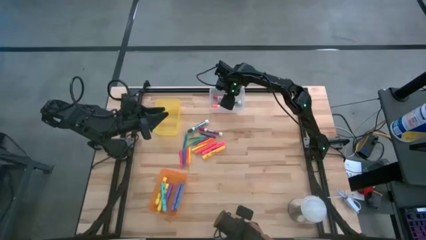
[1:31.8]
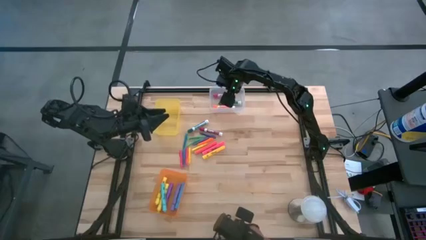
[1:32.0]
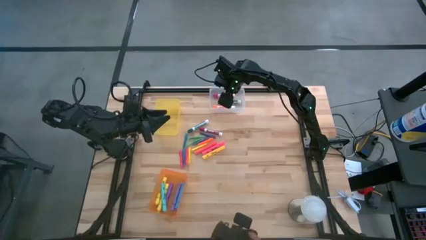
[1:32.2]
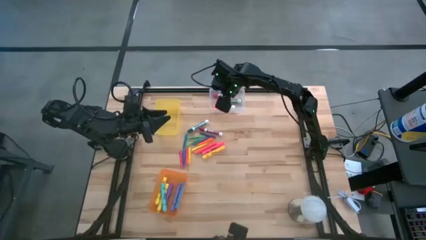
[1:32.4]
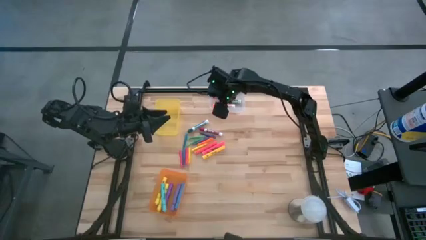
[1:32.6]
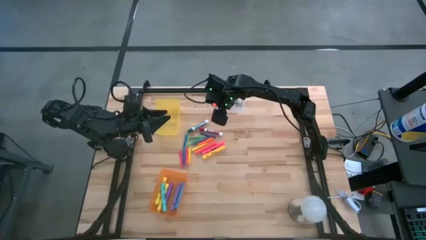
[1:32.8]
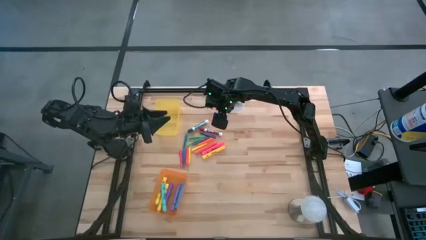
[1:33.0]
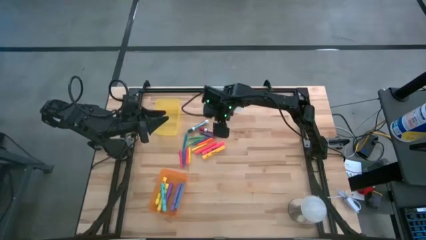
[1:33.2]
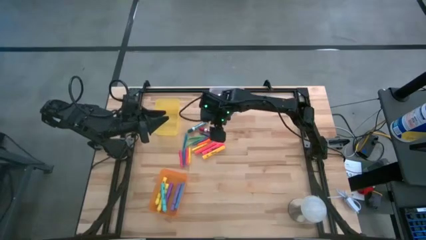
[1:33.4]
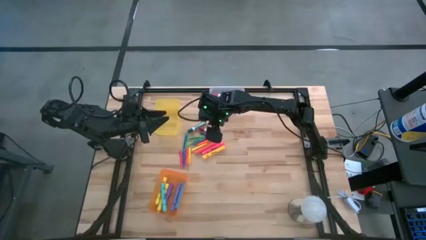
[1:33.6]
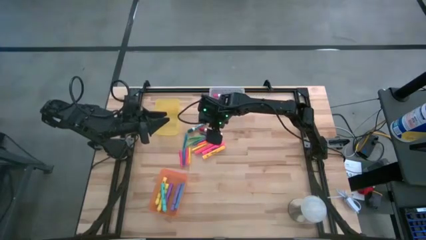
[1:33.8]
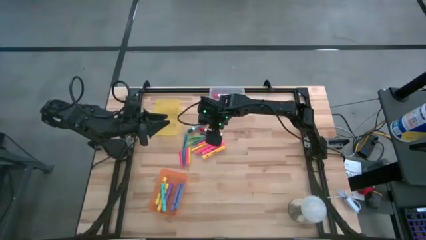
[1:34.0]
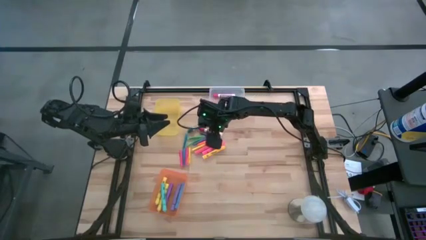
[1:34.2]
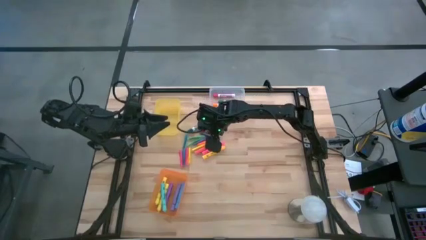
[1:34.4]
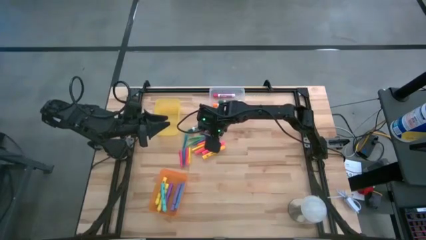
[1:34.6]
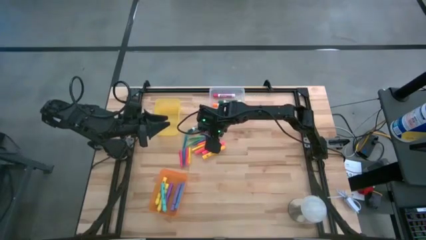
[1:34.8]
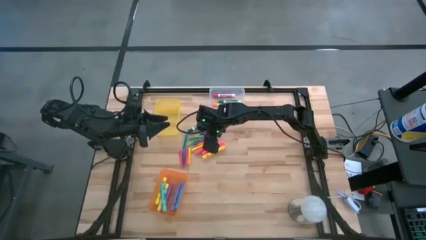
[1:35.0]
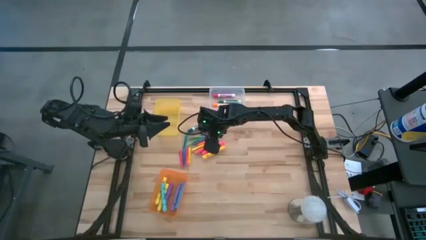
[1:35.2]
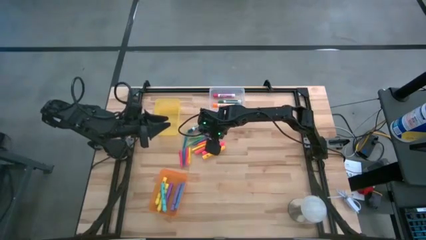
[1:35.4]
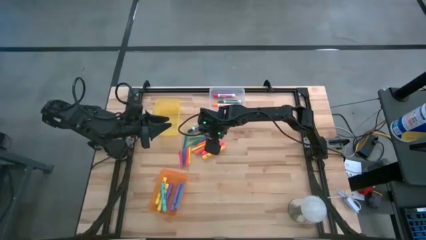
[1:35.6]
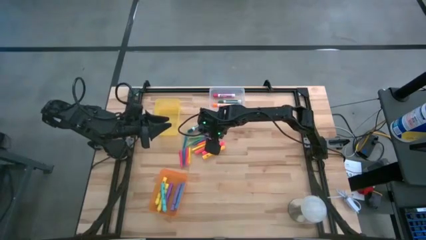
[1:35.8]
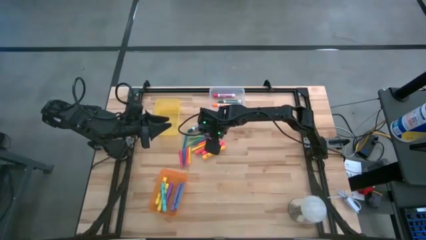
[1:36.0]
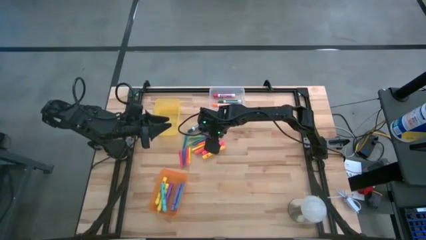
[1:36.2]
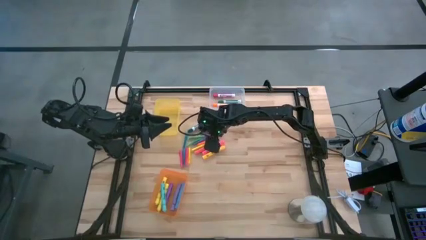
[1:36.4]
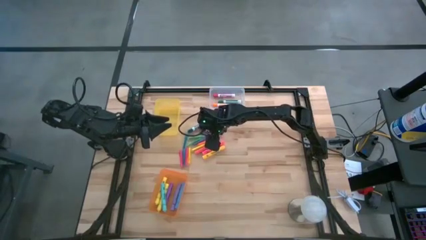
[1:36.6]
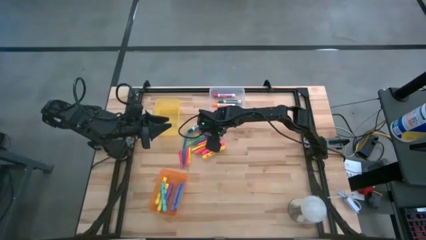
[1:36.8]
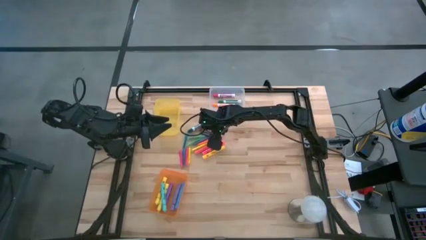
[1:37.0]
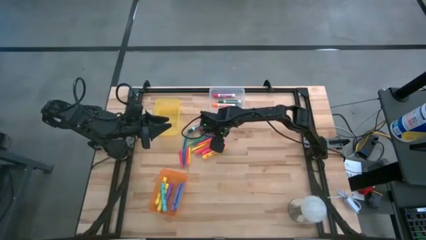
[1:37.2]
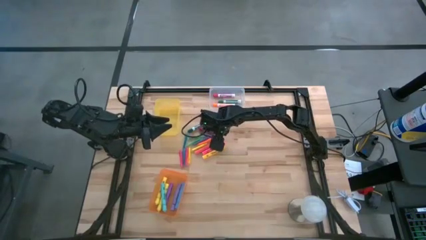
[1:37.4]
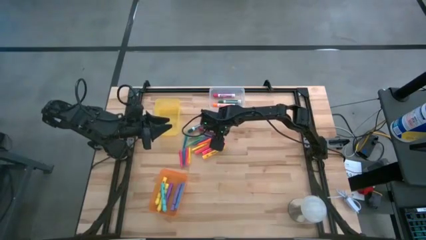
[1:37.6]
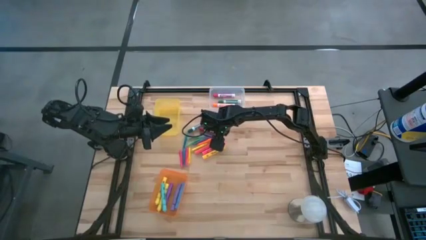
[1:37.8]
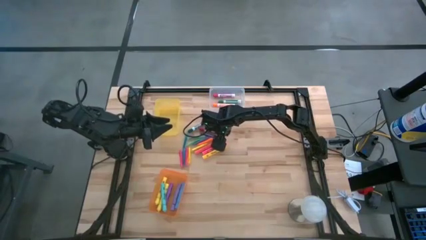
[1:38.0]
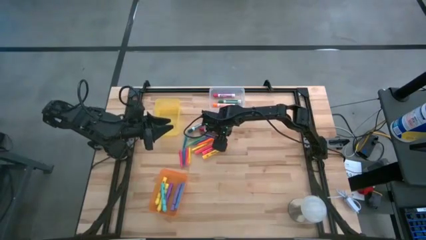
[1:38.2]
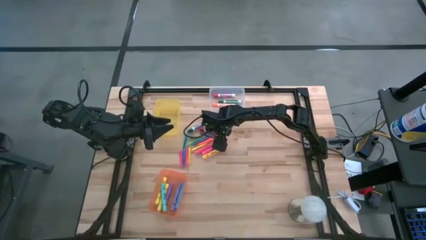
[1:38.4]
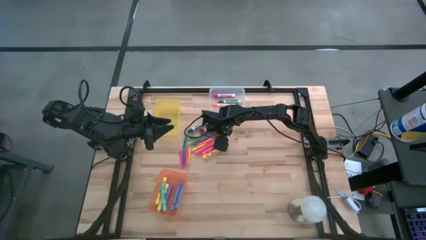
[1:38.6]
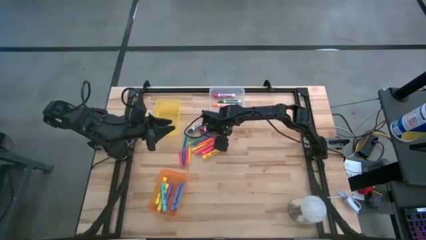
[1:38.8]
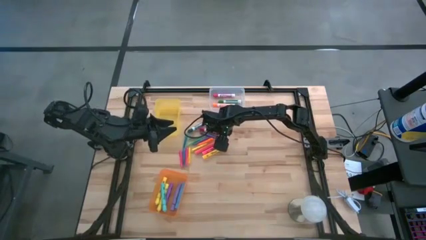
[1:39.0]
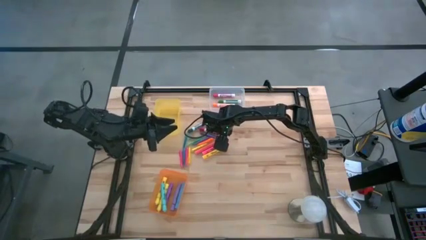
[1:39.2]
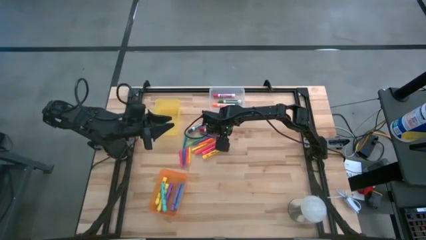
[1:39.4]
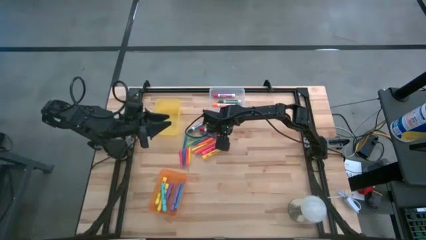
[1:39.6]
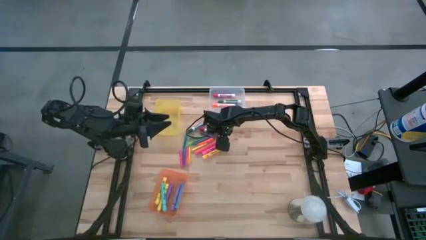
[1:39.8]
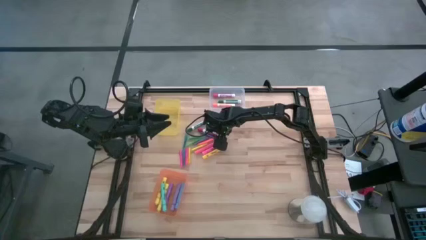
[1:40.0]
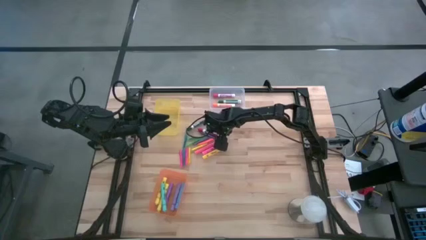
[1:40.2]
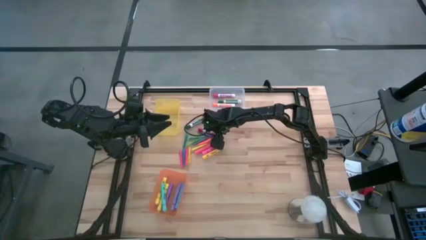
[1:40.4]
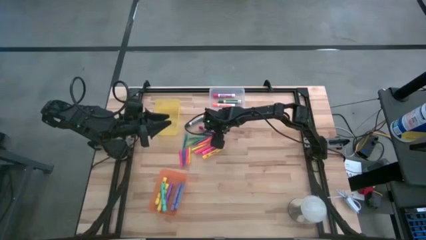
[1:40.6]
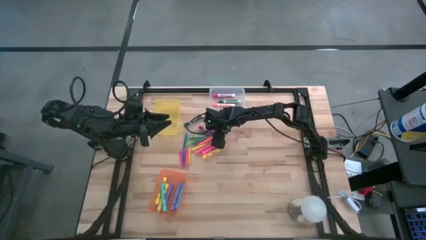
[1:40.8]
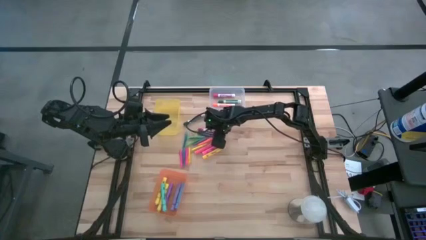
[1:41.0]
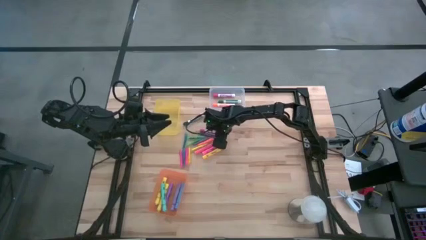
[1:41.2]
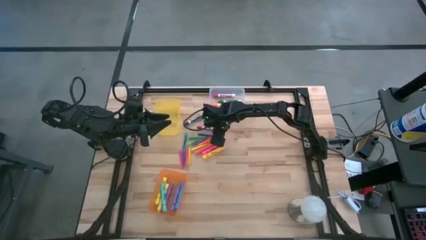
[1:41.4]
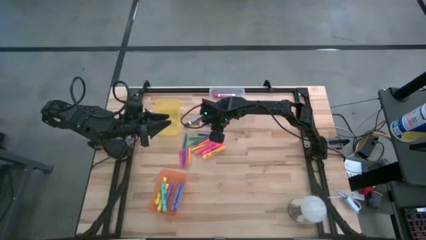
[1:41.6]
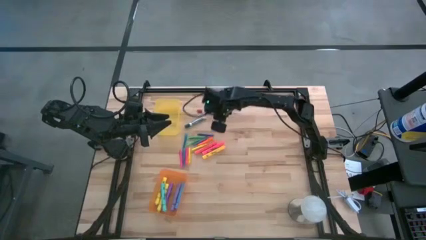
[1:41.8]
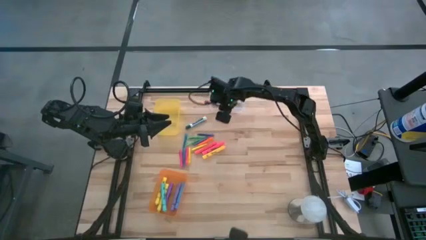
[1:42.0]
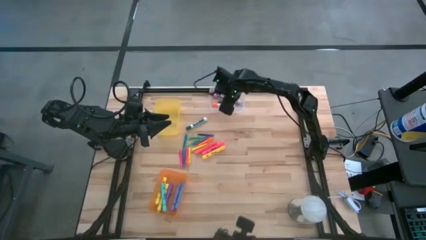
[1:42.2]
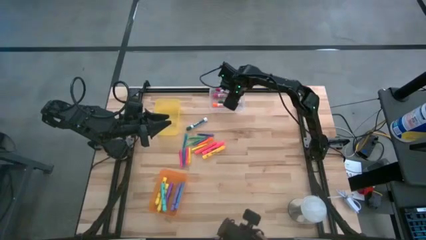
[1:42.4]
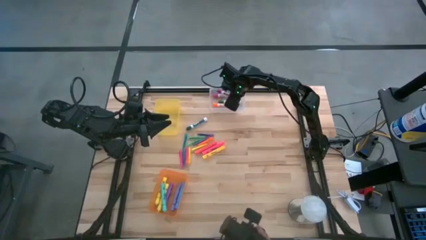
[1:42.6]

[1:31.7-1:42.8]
Task: Pick & Place Markers
Put the red marker into the transparent bin

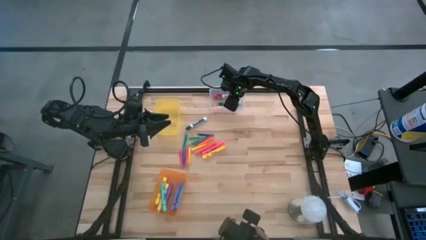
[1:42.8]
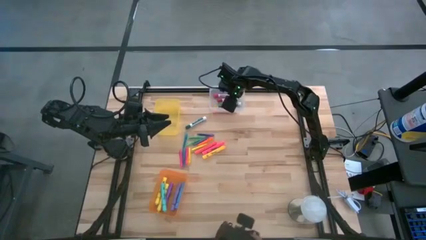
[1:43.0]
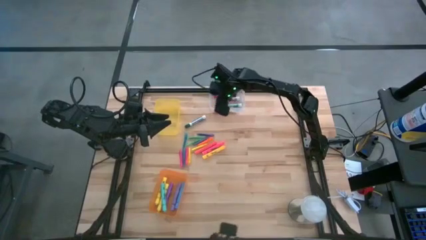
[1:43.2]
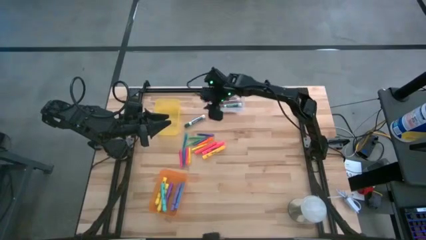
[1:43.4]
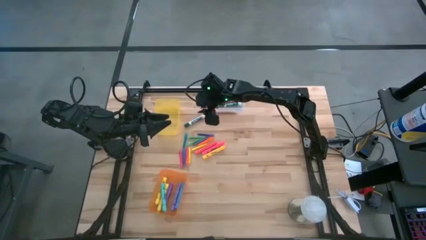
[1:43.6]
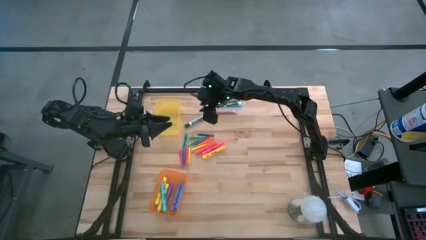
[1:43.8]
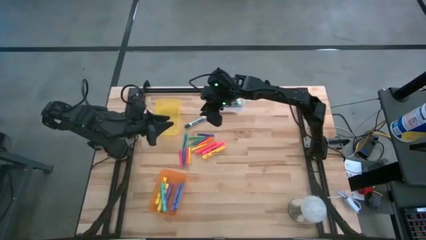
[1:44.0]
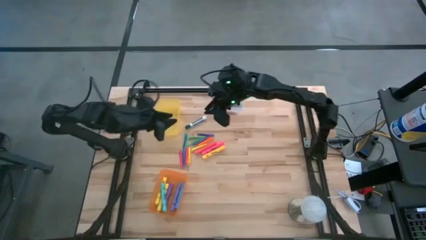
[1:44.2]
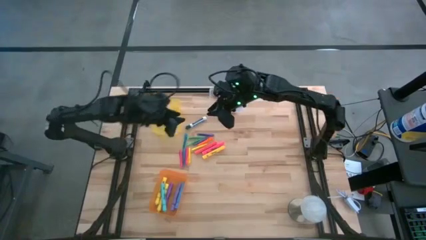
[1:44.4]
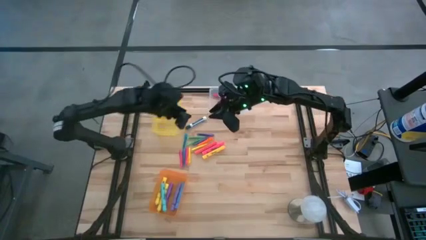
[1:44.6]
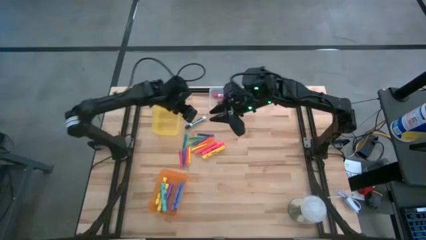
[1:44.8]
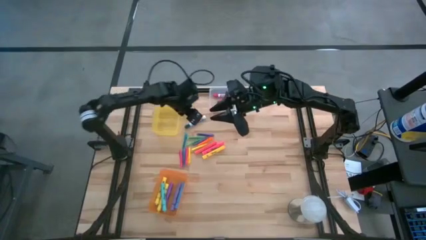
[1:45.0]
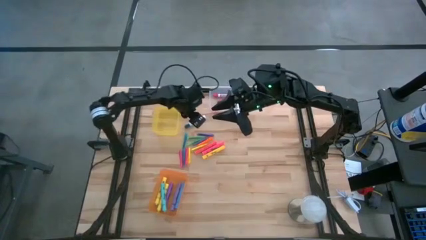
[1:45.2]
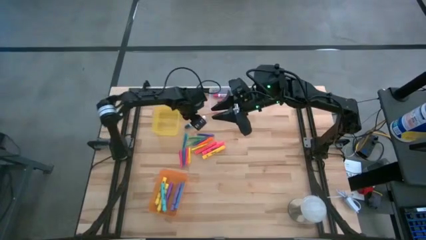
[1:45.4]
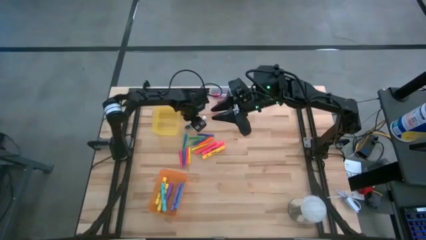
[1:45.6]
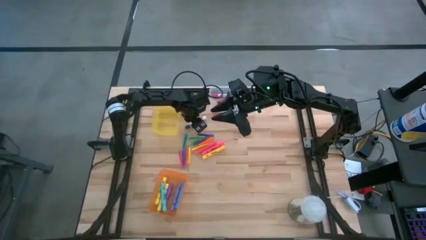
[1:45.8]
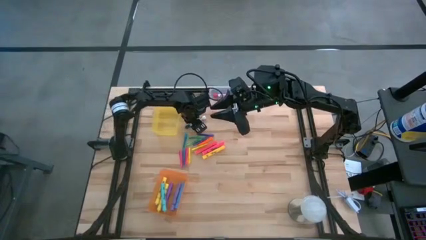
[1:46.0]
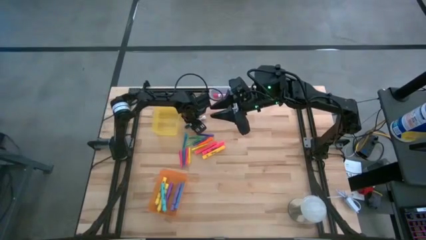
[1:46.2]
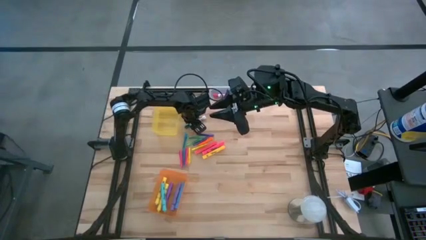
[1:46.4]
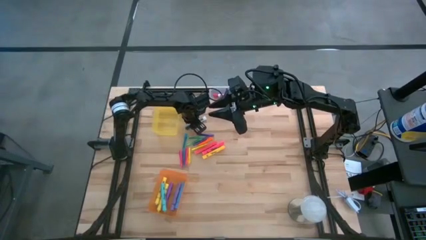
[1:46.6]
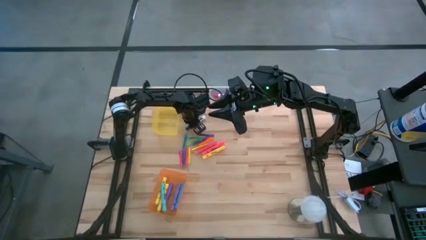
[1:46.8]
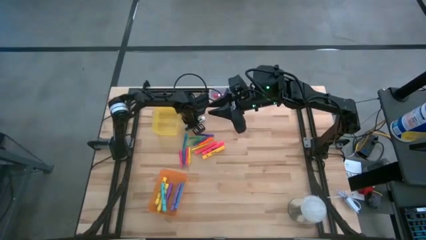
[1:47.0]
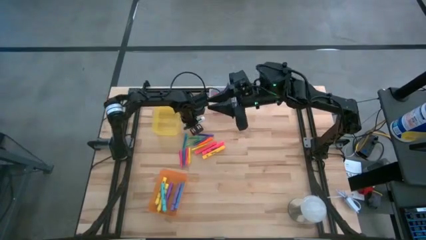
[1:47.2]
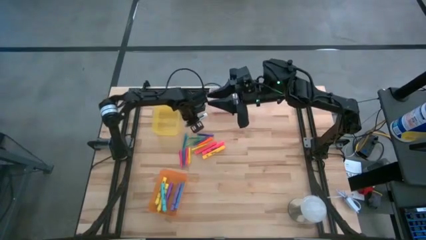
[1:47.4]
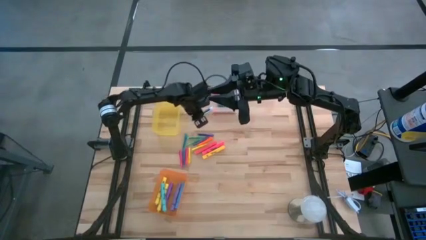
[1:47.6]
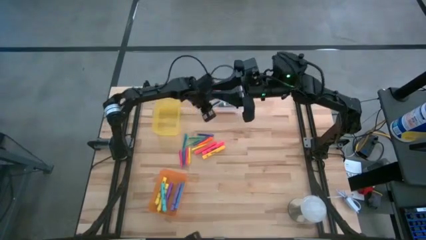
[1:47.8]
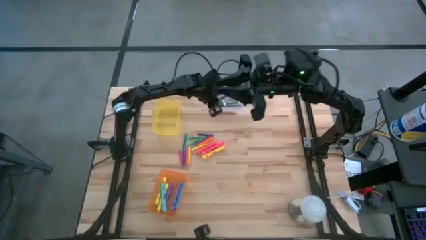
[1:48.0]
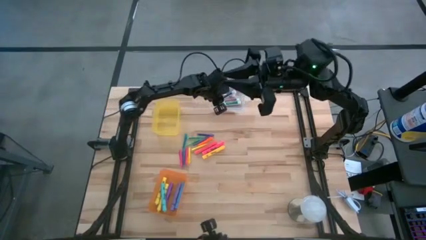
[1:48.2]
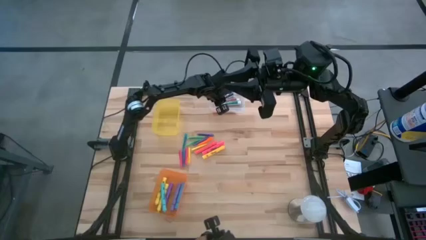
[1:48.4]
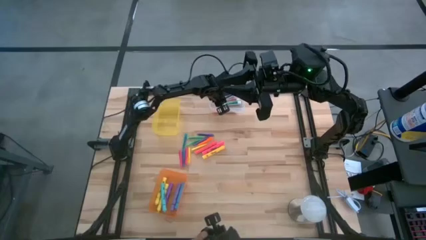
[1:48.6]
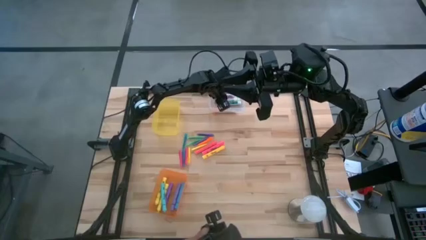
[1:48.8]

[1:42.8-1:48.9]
Put the dark green marker into the transparent bin
